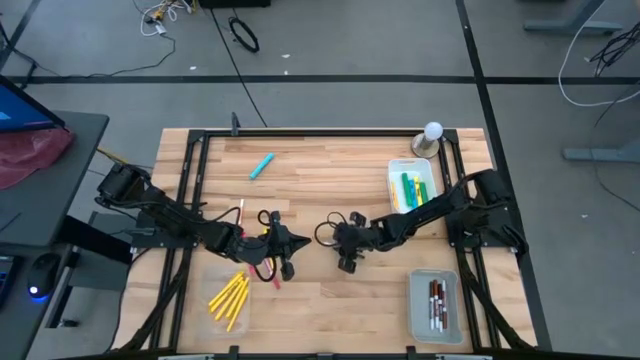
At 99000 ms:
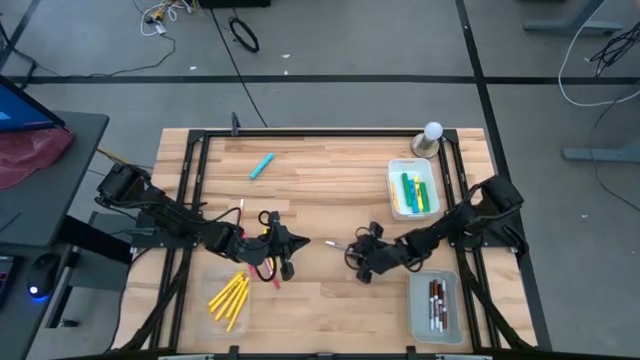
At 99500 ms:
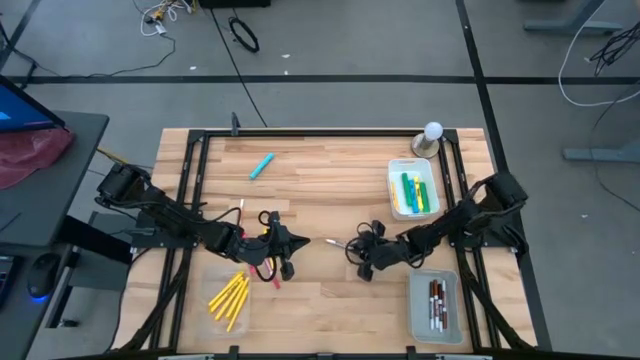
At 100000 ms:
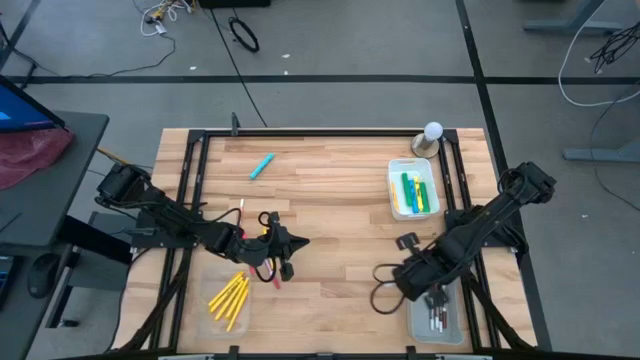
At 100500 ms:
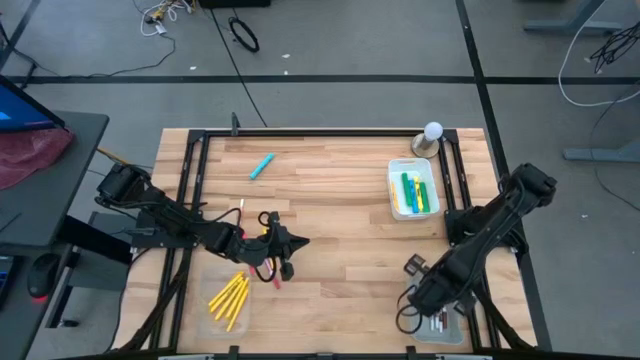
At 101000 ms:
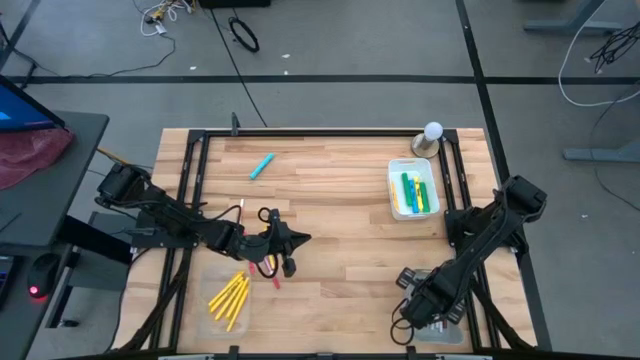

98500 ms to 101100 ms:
Task: Pick & Place Markers
Put the brown marker into the gray bin

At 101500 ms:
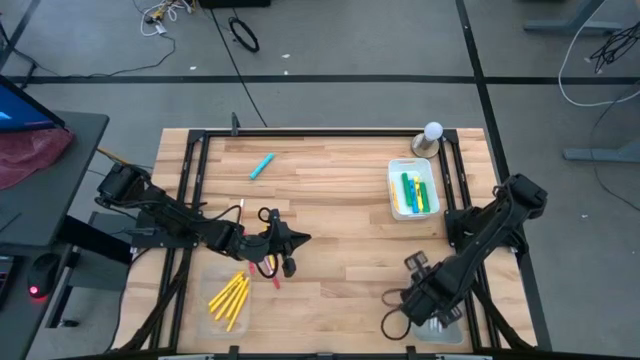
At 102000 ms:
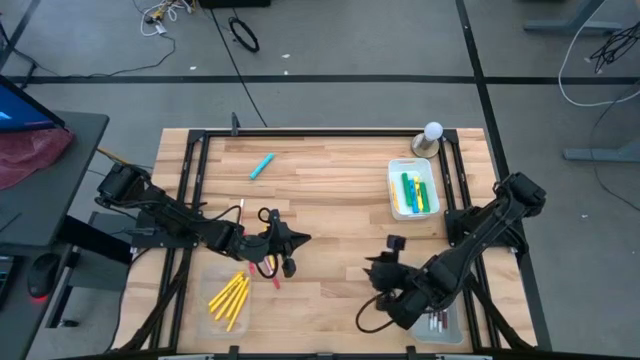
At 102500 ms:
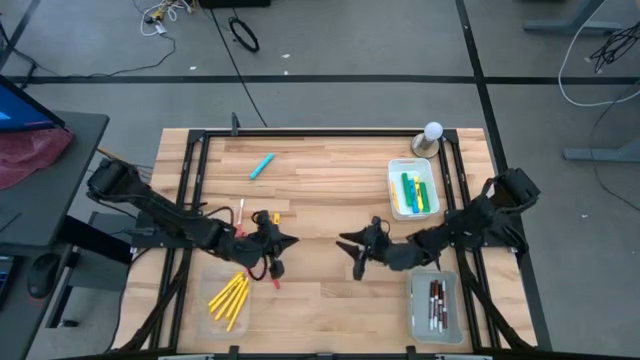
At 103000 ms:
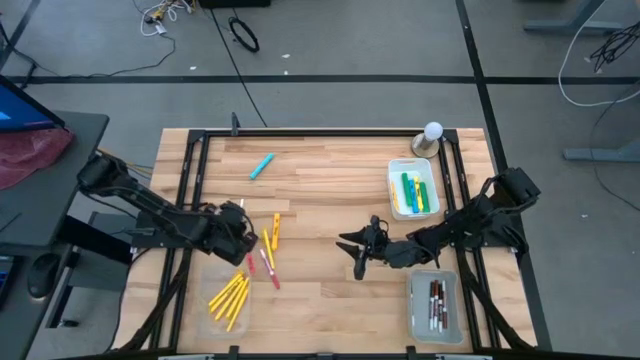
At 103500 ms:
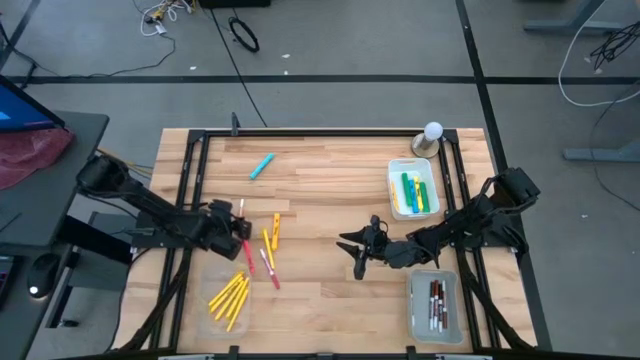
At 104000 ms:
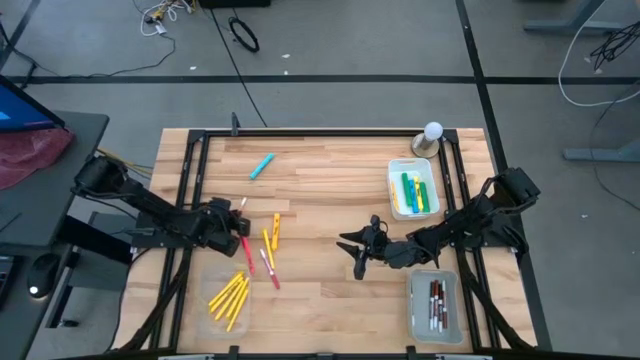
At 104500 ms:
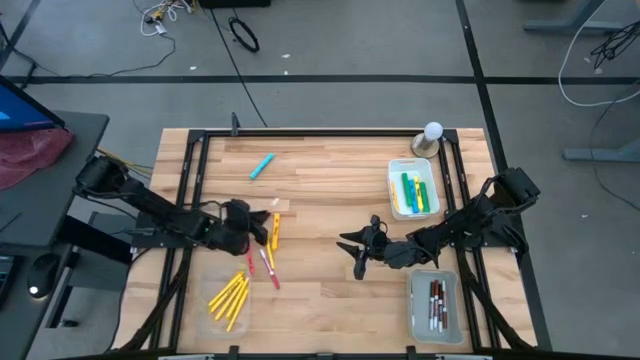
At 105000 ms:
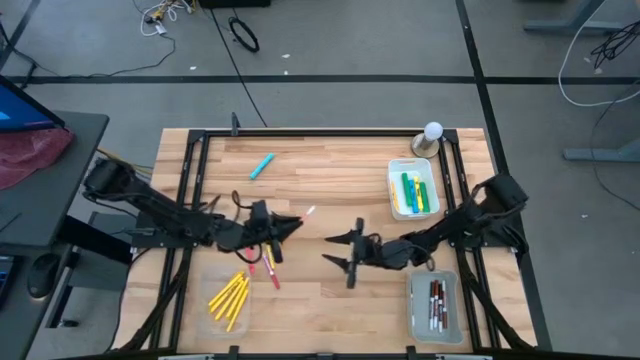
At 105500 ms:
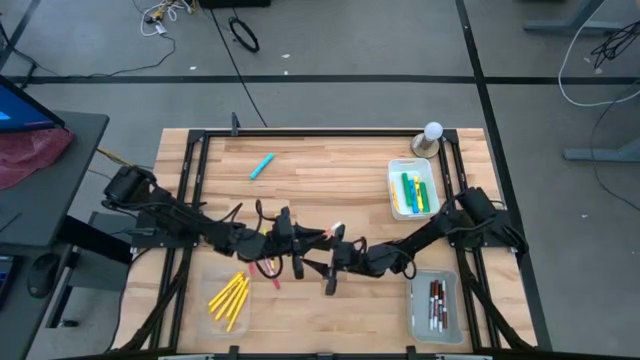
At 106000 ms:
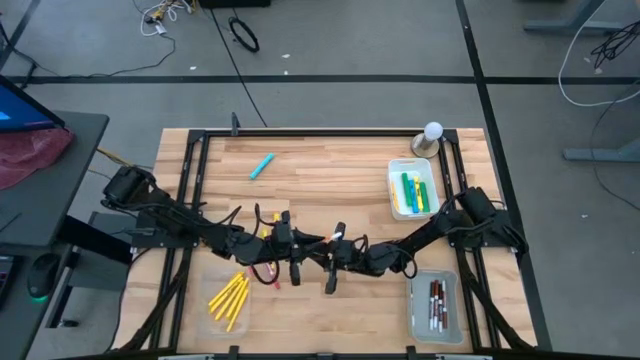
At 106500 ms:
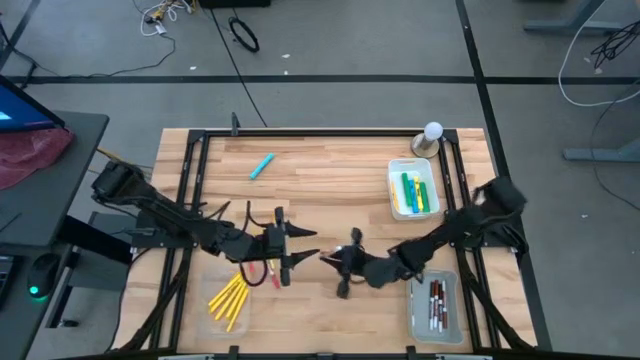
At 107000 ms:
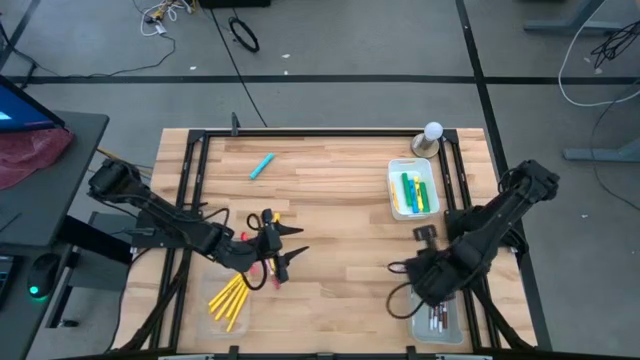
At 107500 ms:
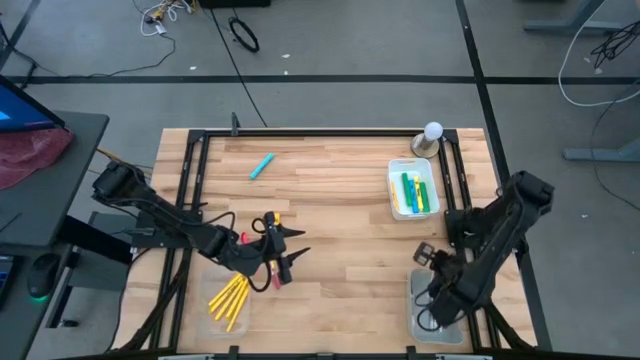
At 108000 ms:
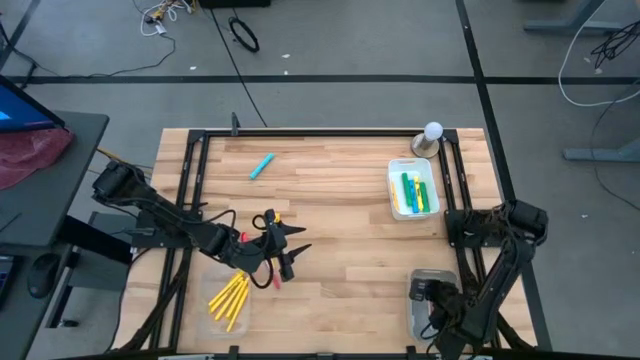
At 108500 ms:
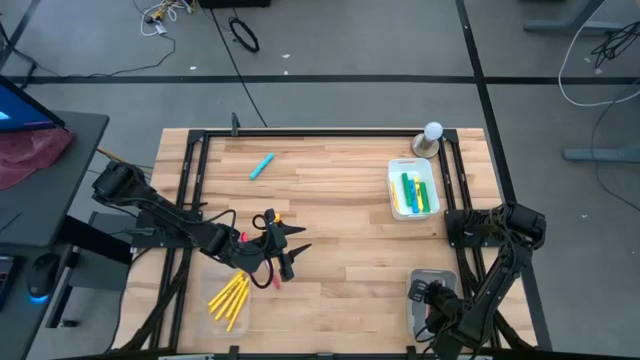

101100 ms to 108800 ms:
Put the orange marker into the gray bin

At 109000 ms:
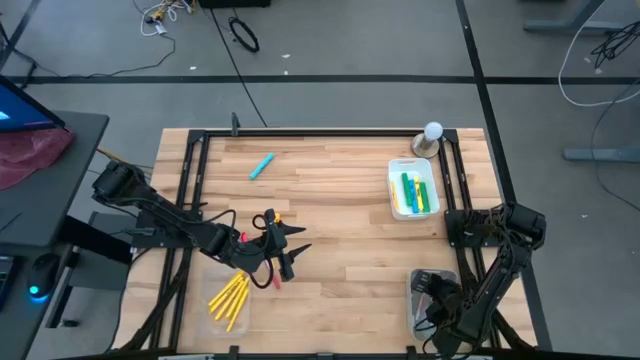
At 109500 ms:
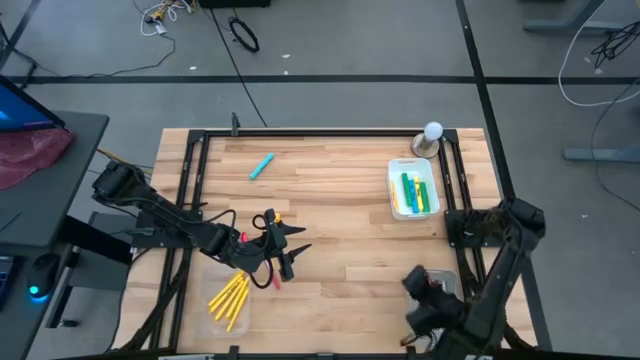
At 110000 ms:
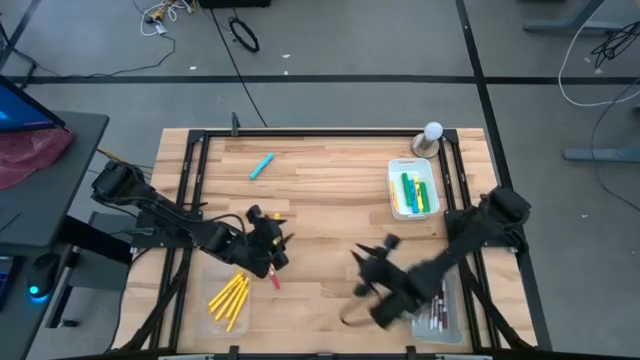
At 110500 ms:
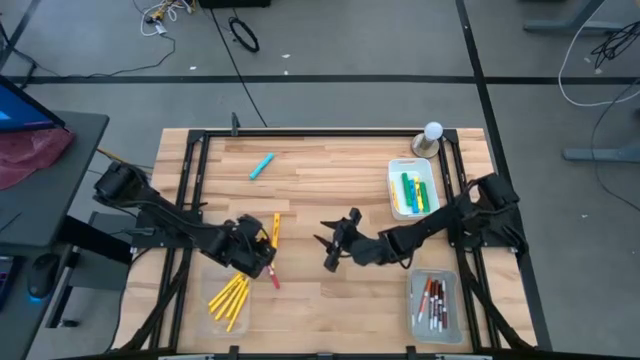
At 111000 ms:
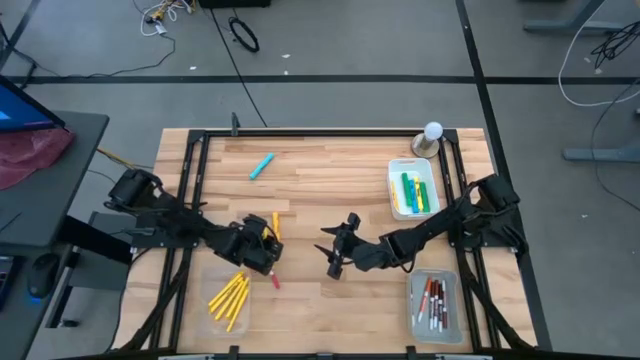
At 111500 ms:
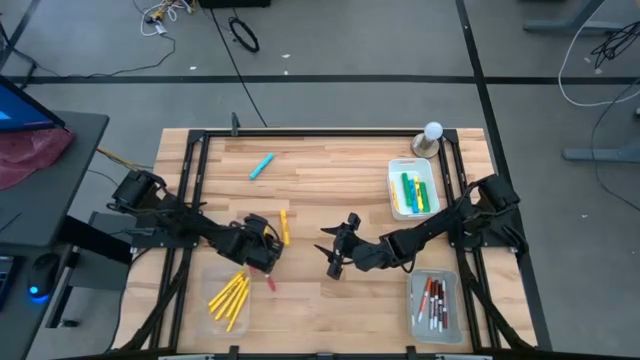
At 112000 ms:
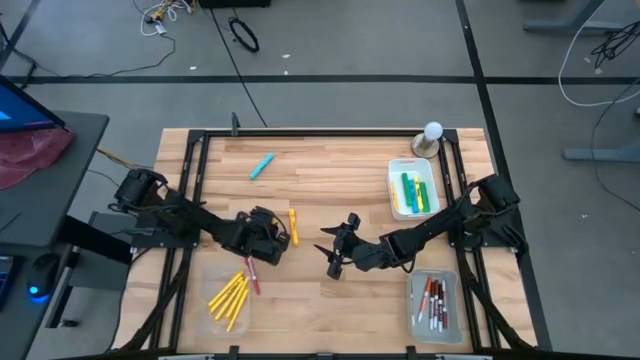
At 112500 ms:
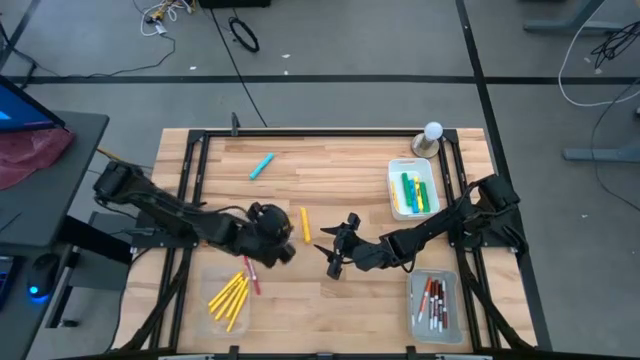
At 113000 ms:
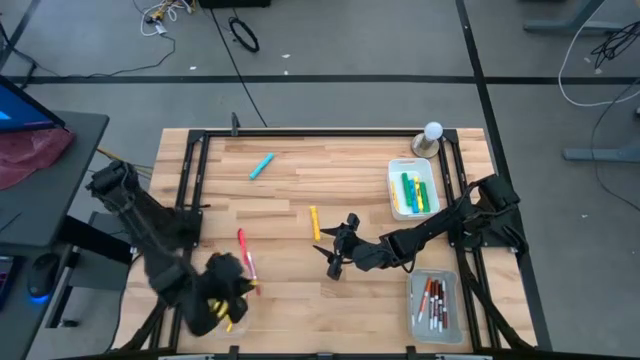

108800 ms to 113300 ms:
Put the yellow pen into the transparent bin

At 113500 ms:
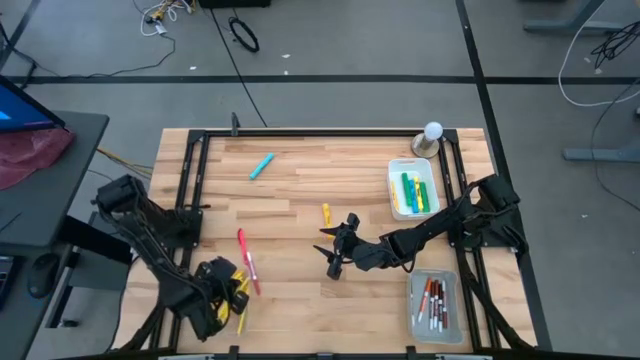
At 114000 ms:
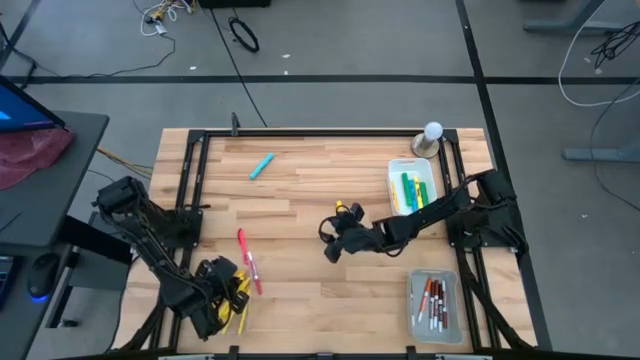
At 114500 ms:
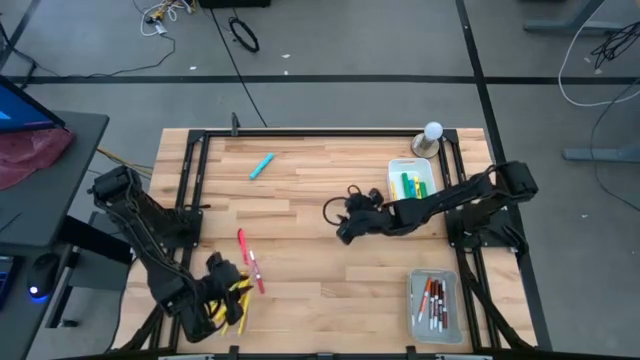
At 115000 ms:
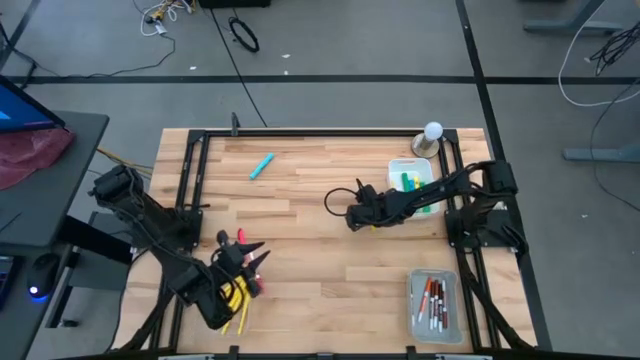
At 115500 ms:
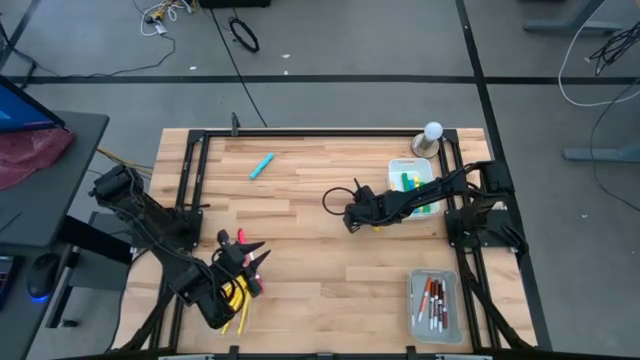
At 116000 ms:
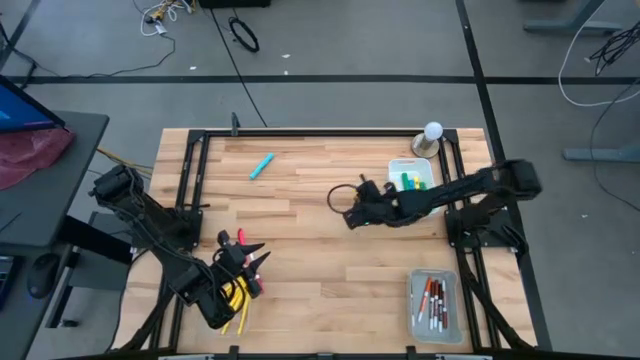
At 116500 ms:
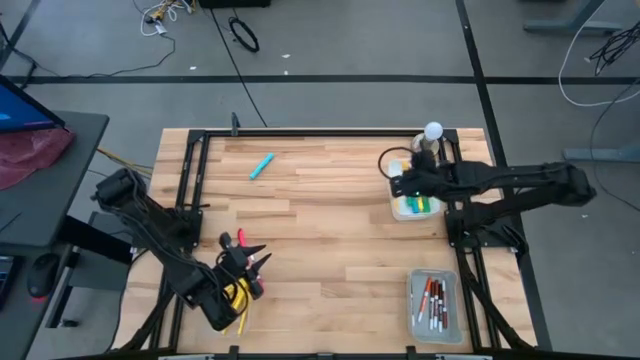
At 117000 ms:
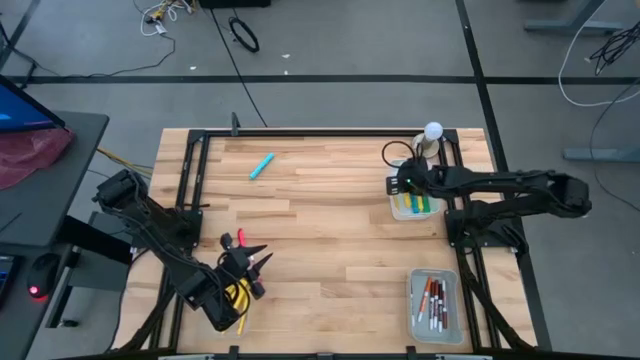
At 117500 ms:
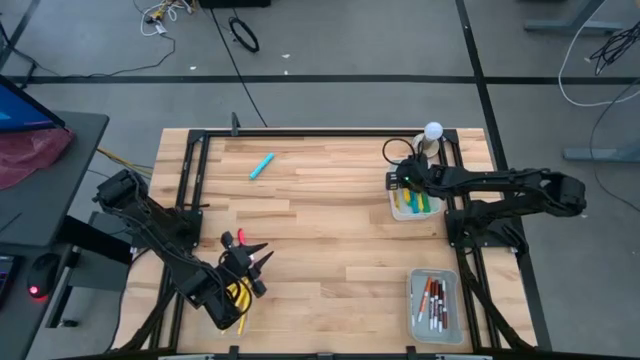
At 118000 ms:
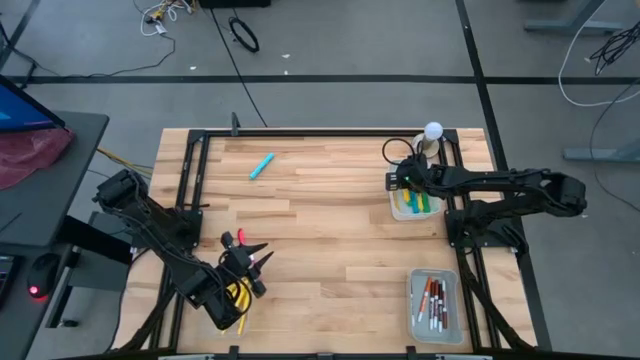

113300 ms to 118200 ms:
Put the yellow highlighter into the white bin
